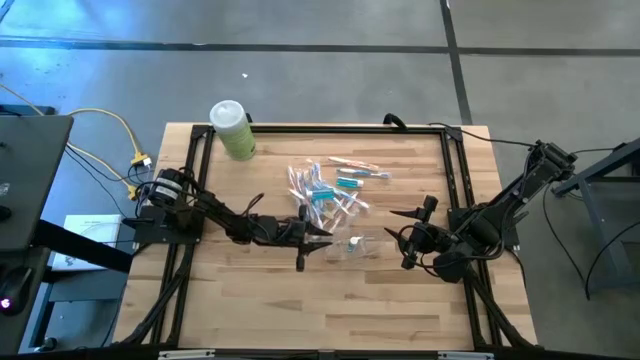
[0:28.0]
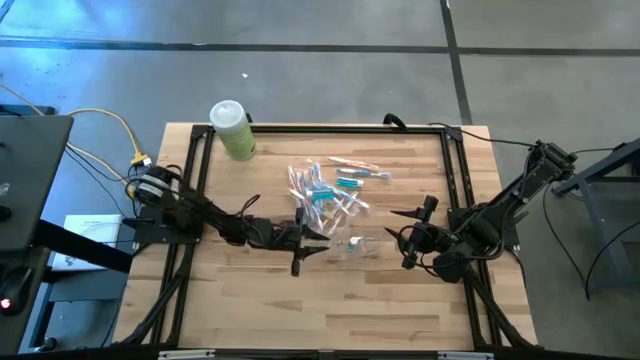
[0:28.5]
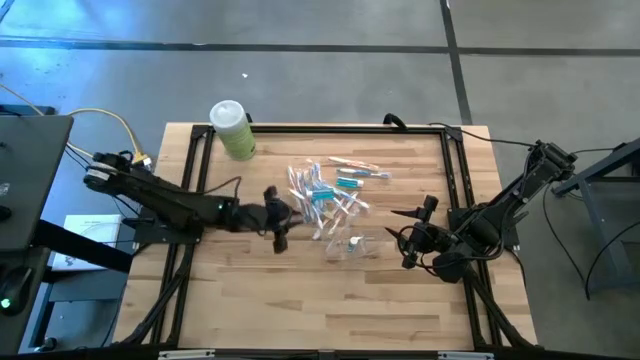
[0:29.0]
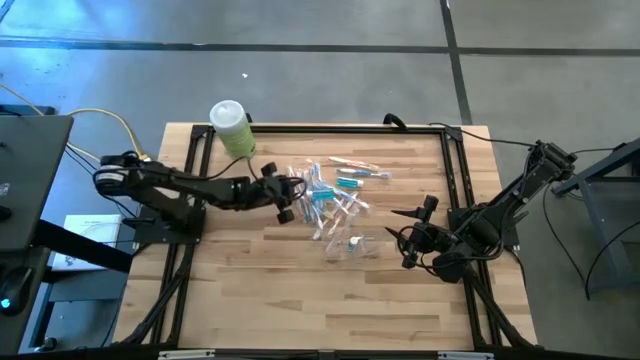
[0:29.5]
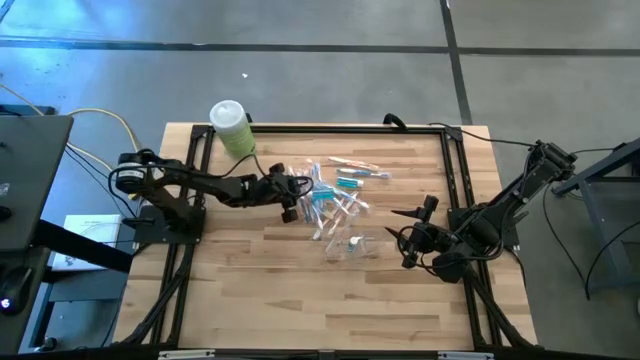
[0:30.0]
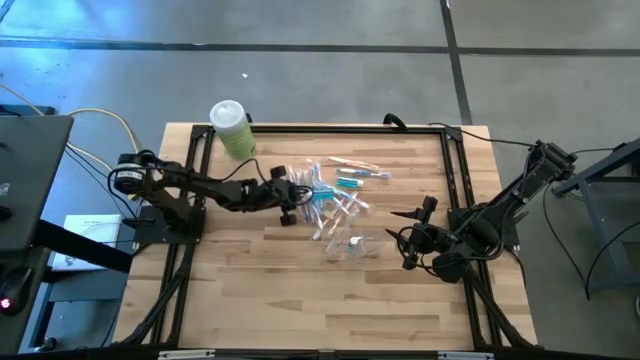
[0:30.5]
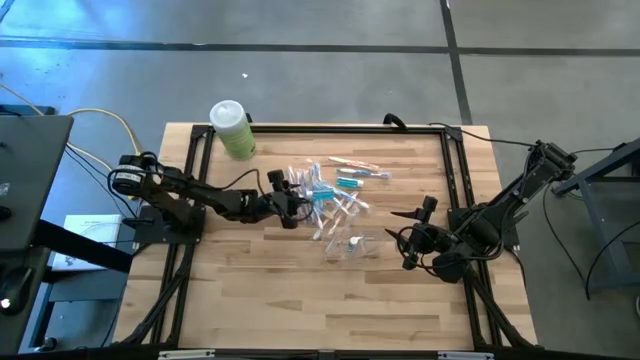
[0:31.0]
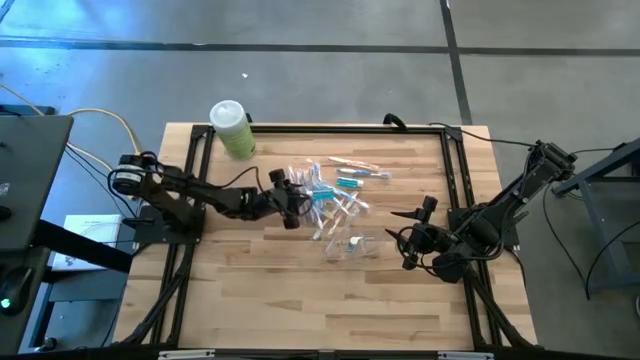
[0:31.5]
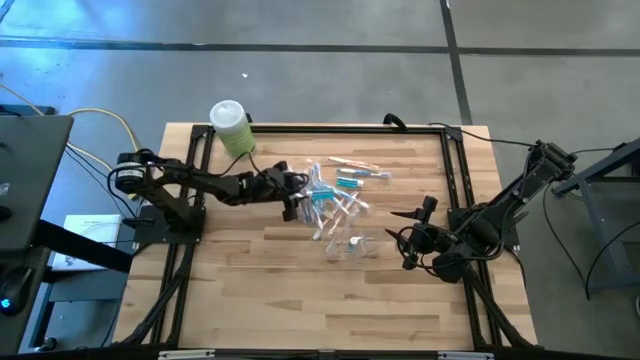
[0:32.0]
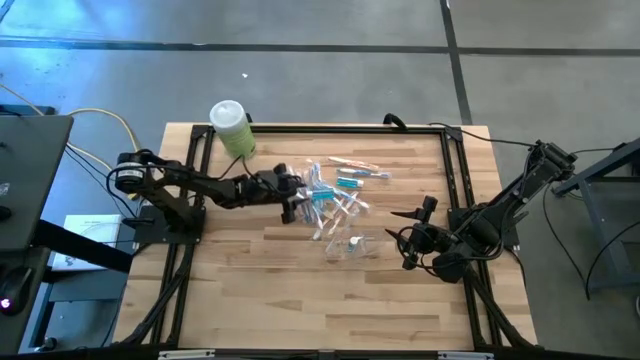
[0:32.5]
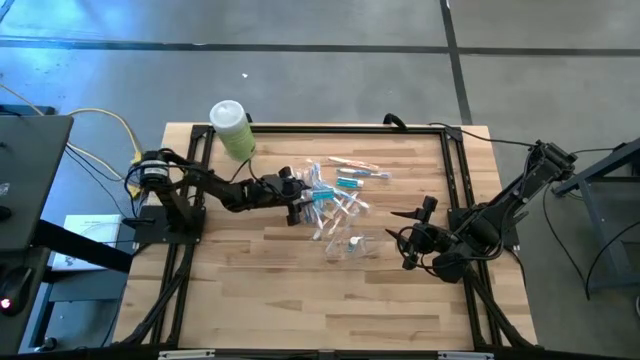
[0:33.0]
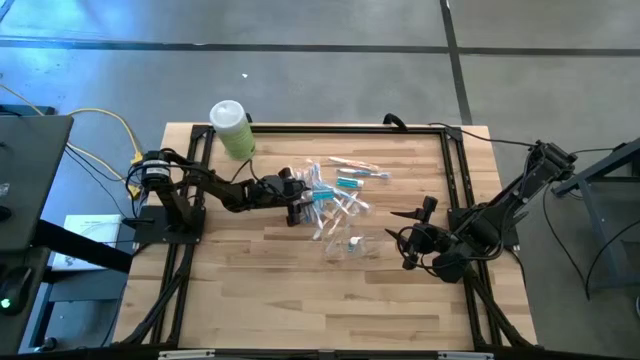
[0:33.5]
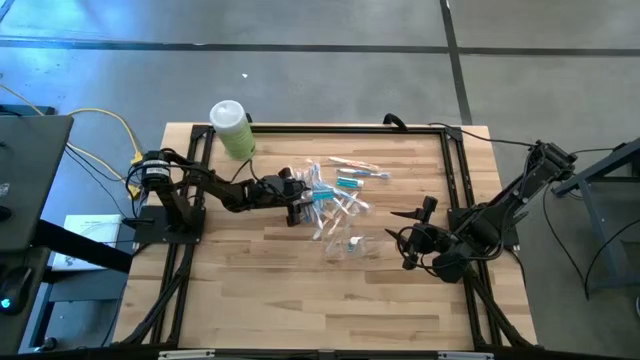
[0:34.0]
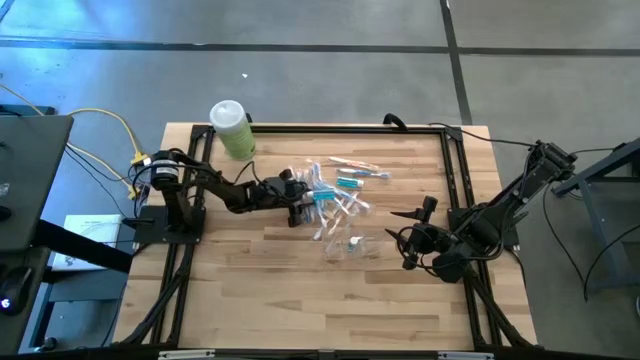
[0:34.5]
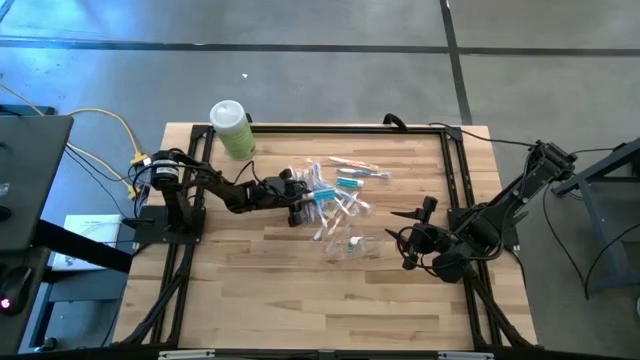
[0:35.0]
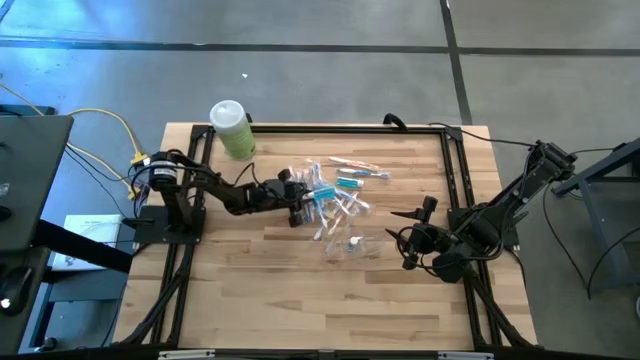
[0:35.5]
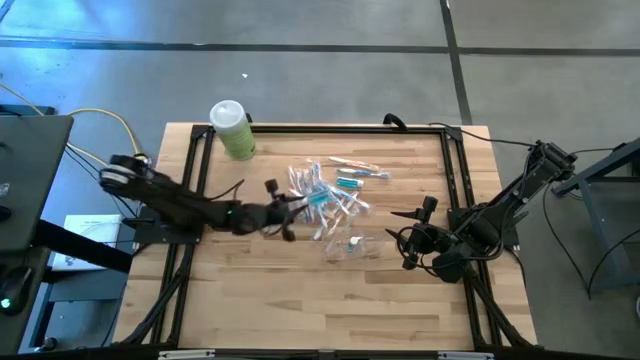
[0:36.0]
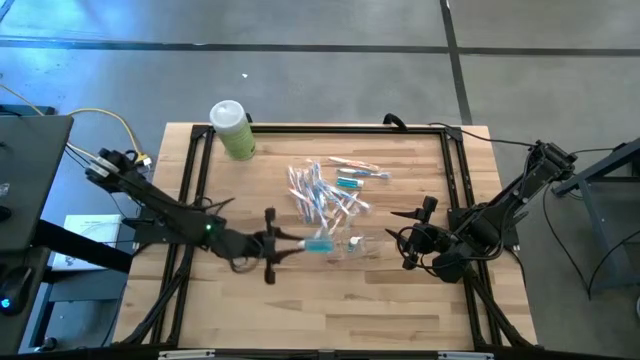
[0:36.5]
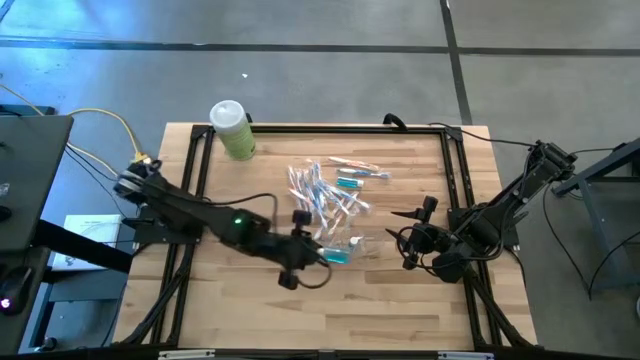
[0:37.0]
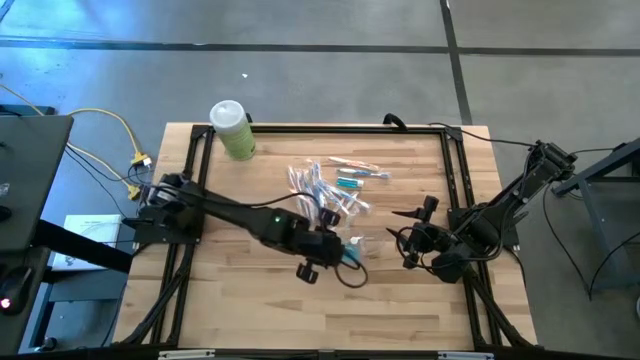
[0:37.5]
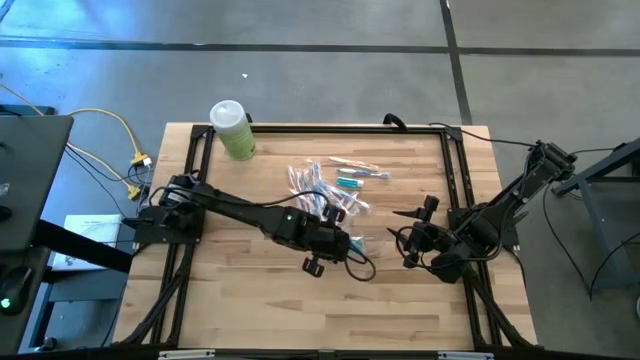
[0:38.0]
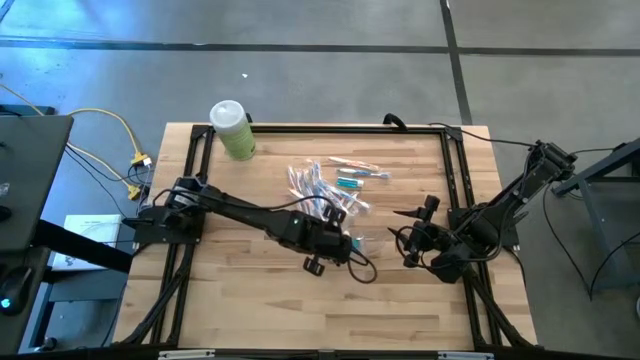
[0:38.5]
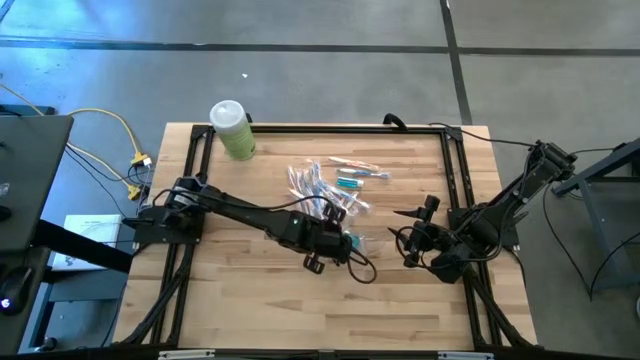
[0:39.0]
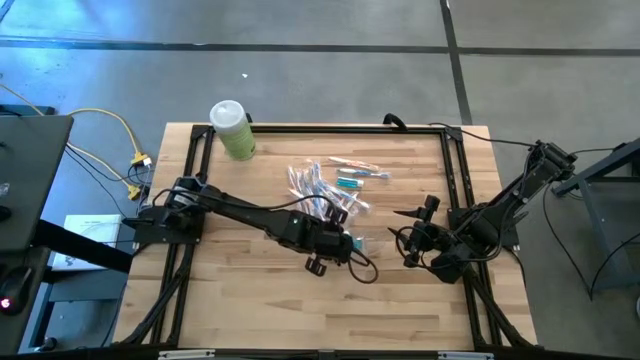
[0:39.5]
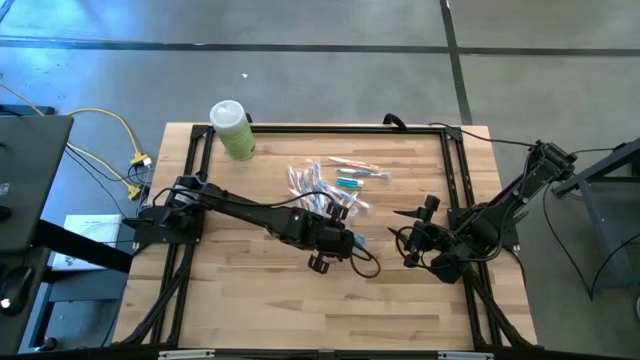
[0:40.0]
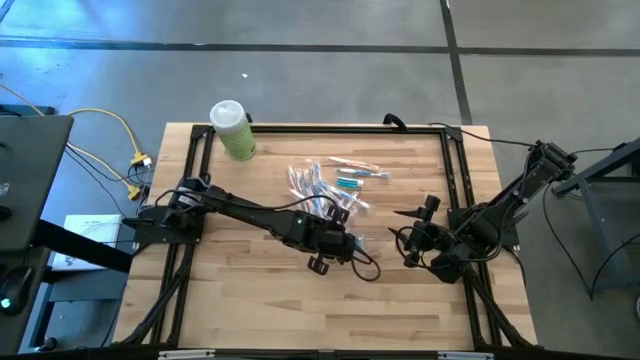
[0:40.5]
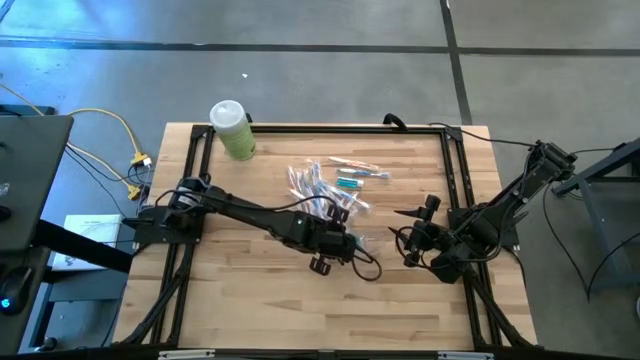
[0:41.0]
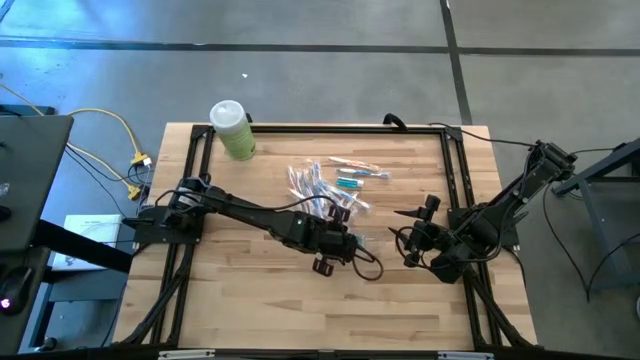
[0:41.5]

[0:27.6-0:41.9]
Task: Pick & Place toothbrushing station
Put the blue mouthwash bottle into the transparent organizer

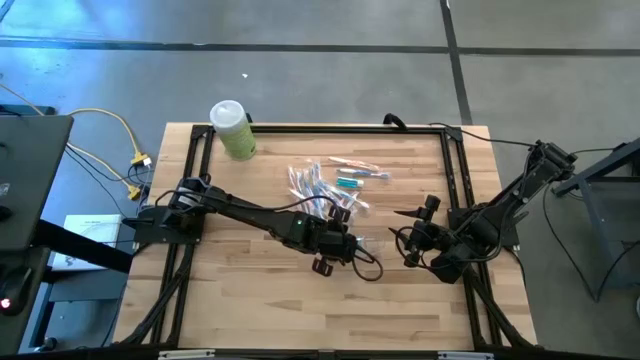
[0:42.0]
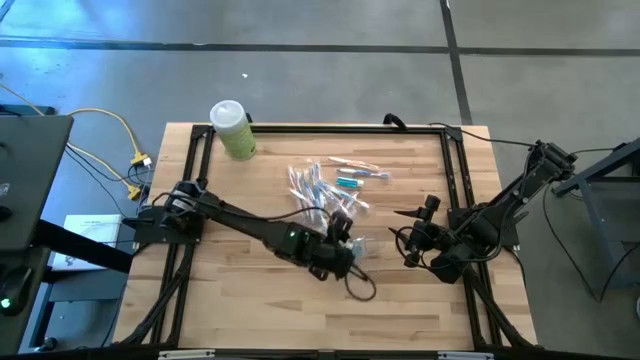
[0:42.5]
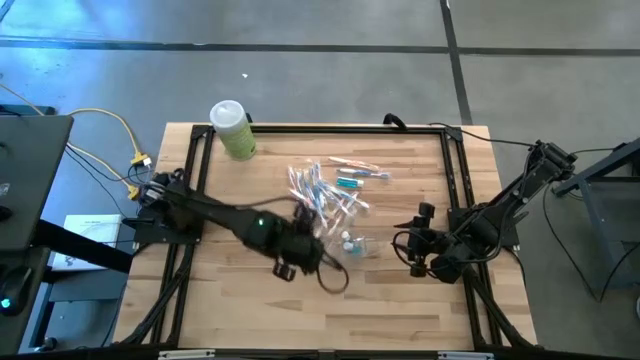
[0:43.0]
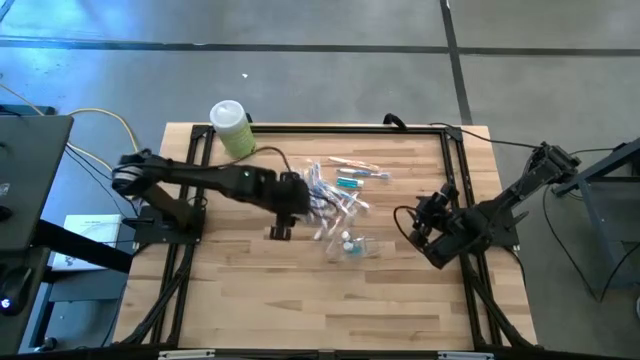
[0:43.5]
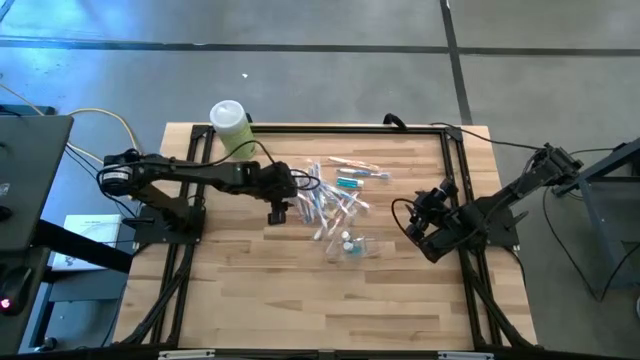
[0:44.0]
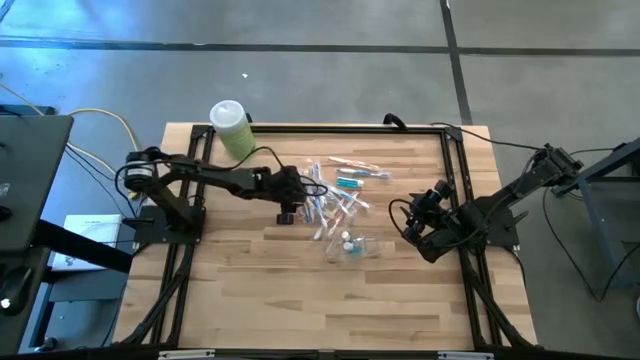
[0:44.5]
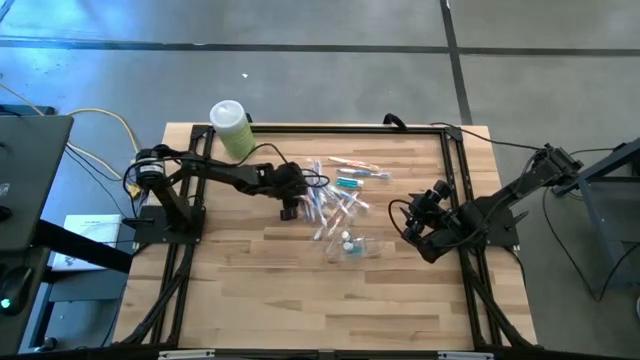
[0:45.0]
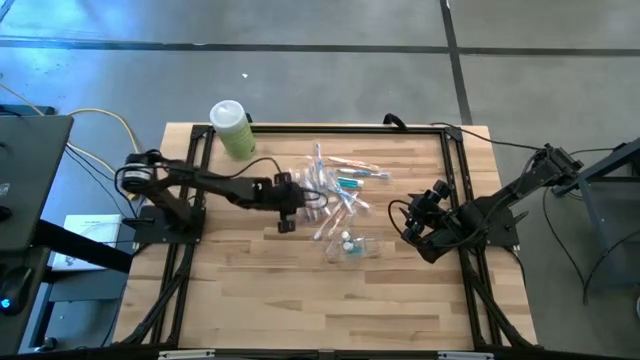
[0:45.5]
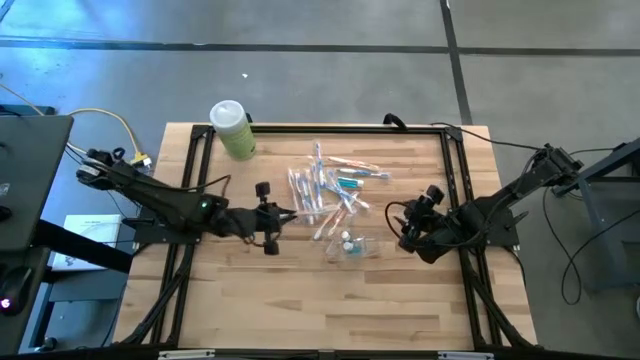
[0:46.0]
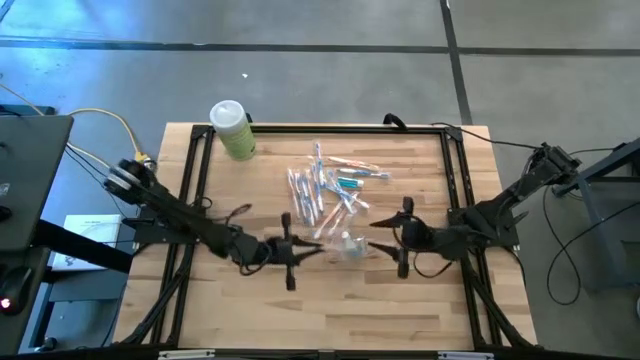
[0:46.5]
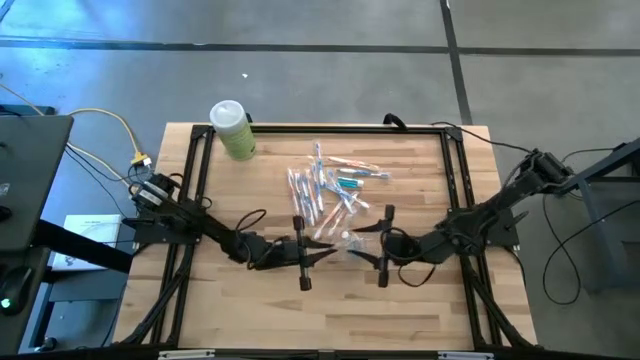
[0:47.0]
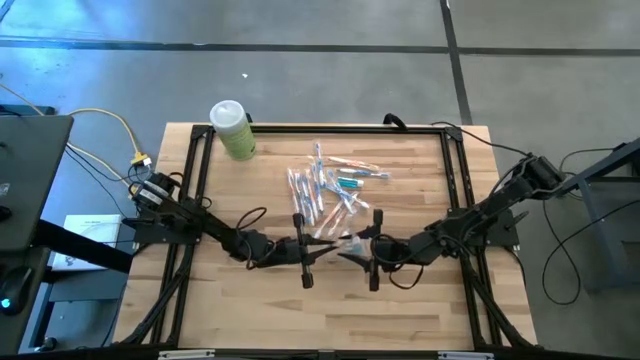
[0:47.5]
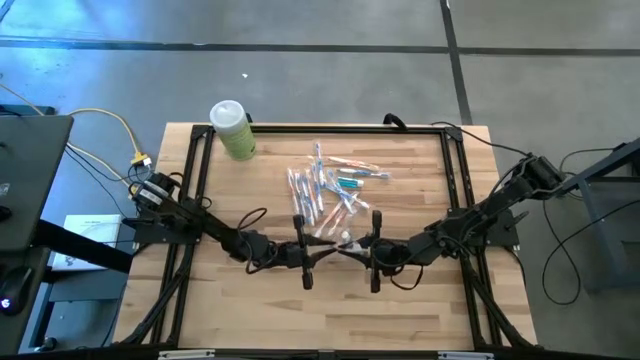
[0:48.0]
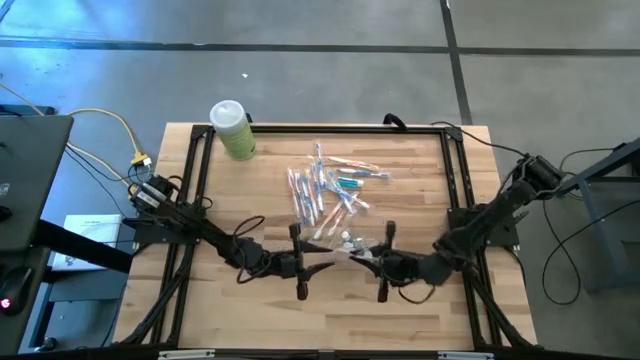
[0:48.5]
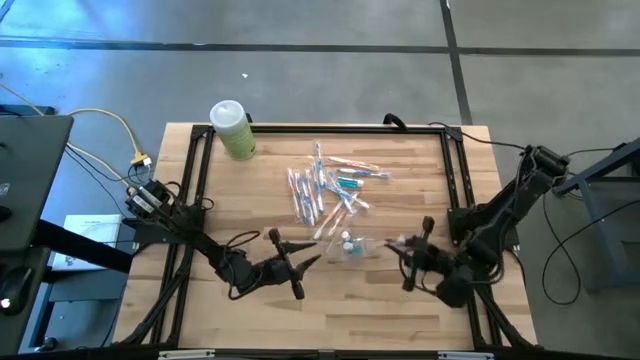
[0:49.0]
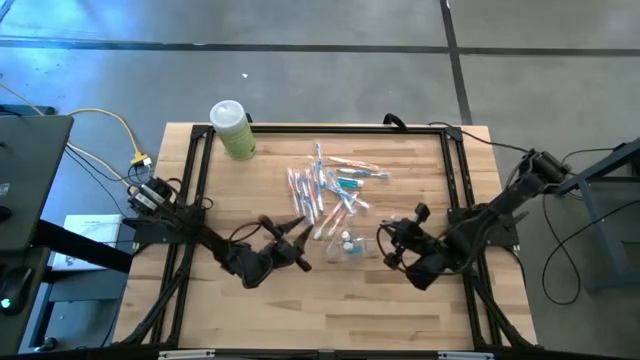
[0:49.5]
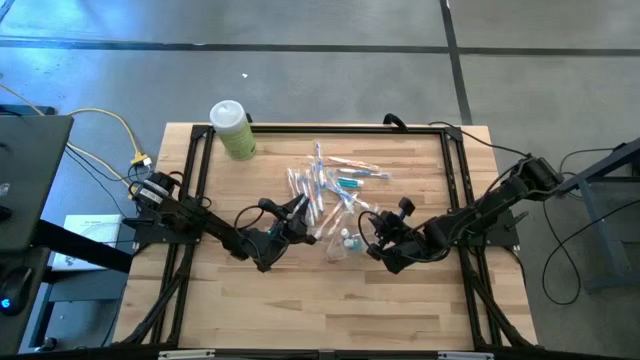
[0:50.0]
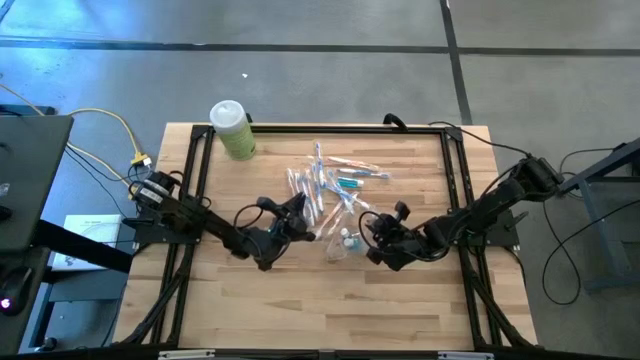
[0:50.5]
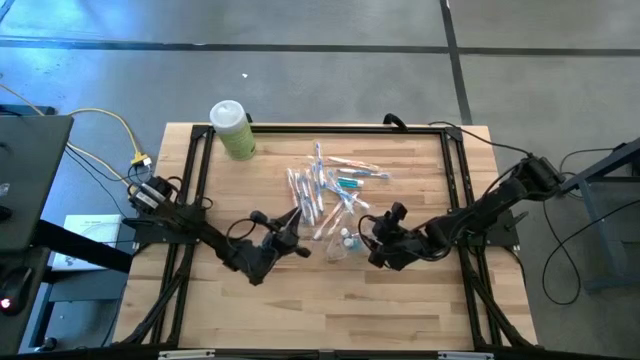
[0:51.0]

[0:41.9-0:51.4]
Put the orange toothbrush into the transparent organizer
